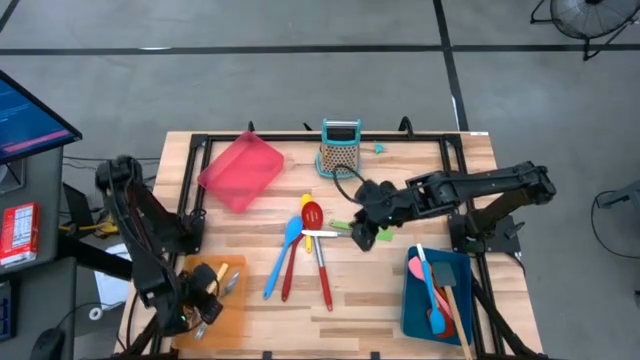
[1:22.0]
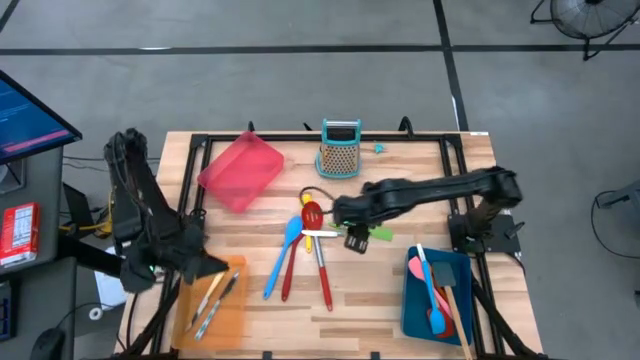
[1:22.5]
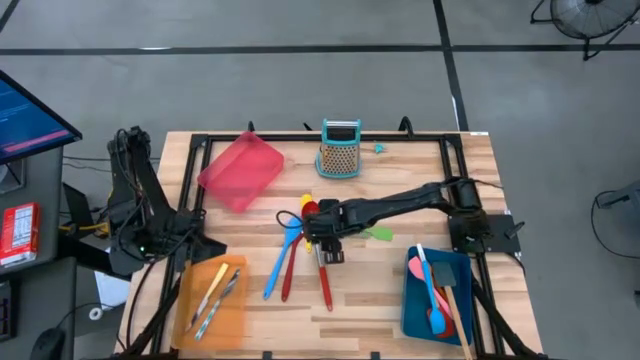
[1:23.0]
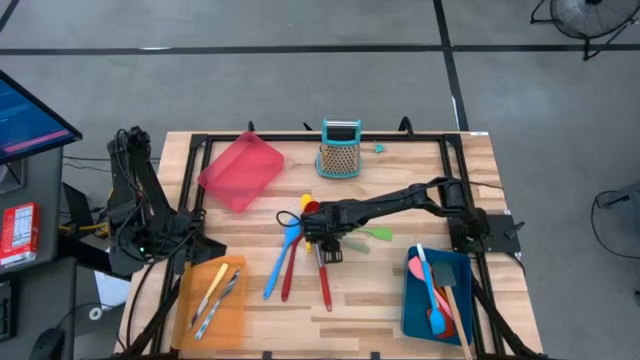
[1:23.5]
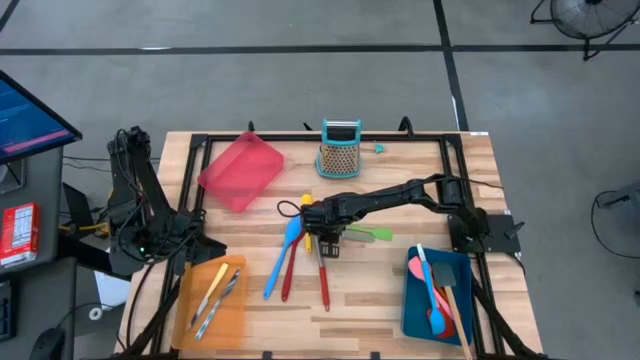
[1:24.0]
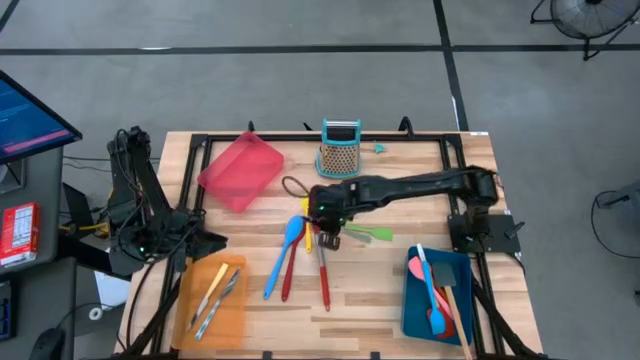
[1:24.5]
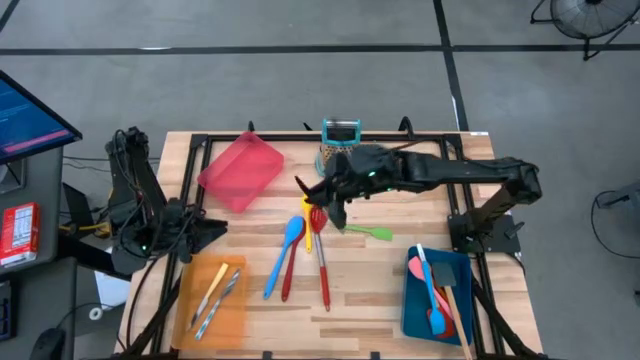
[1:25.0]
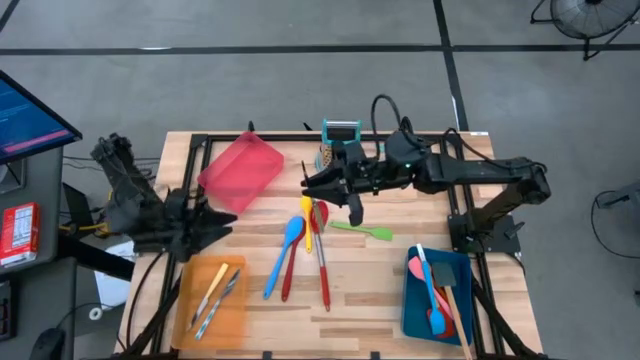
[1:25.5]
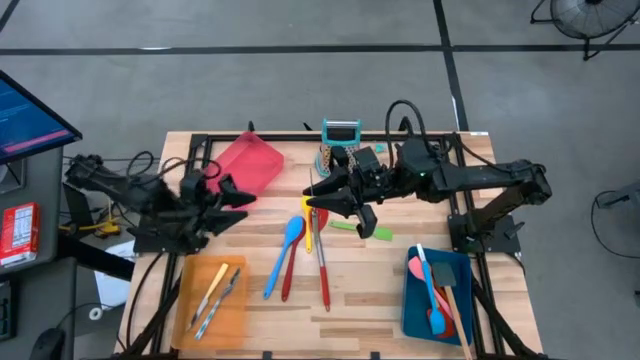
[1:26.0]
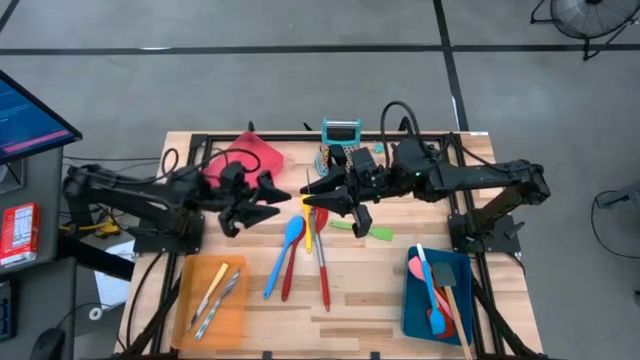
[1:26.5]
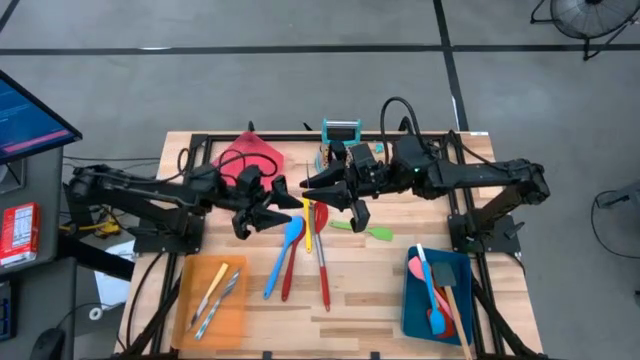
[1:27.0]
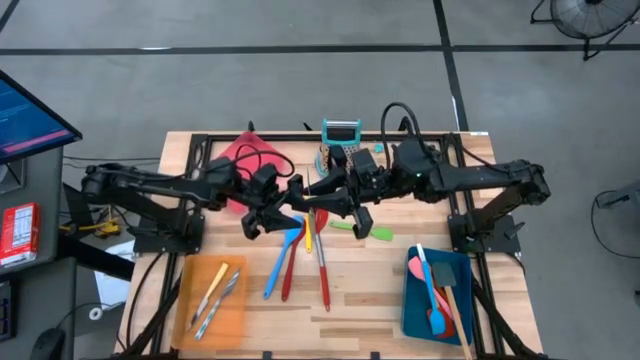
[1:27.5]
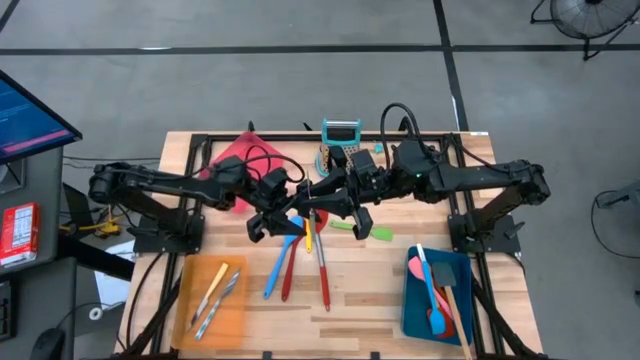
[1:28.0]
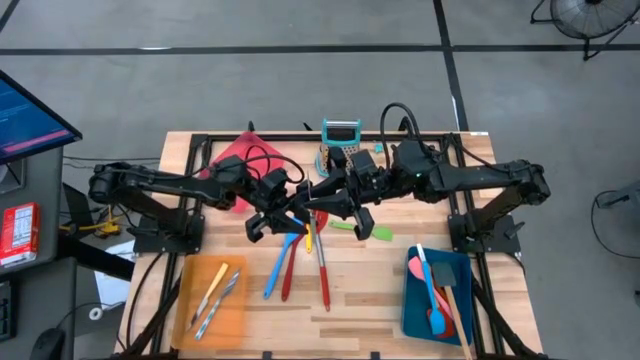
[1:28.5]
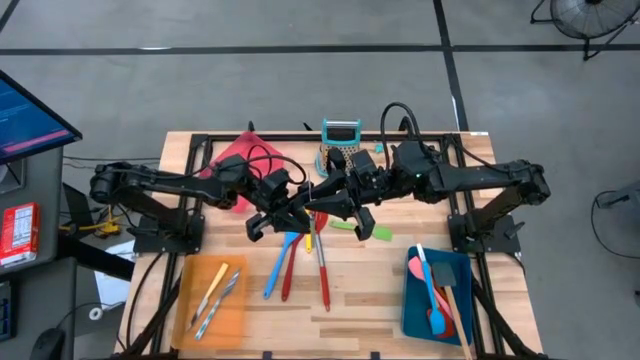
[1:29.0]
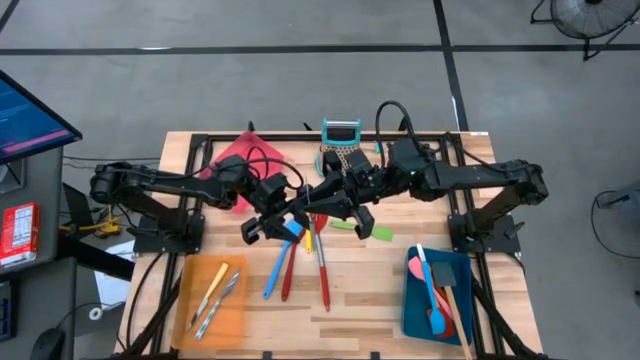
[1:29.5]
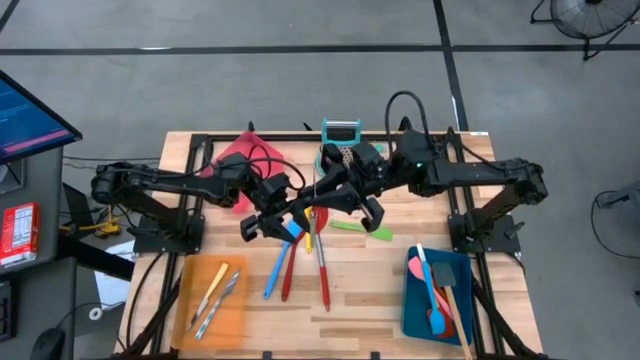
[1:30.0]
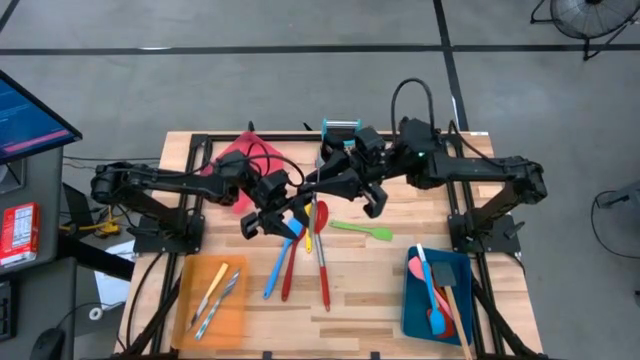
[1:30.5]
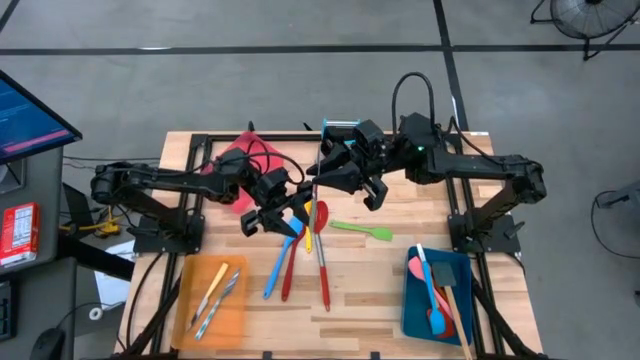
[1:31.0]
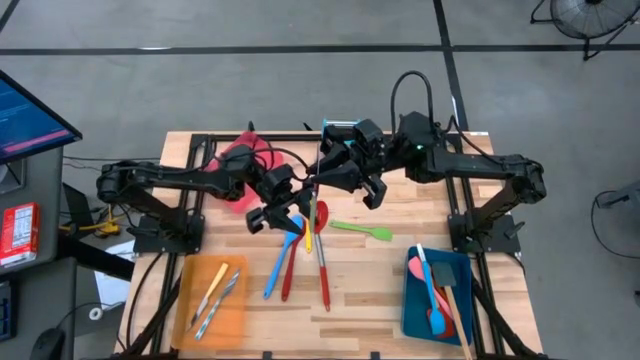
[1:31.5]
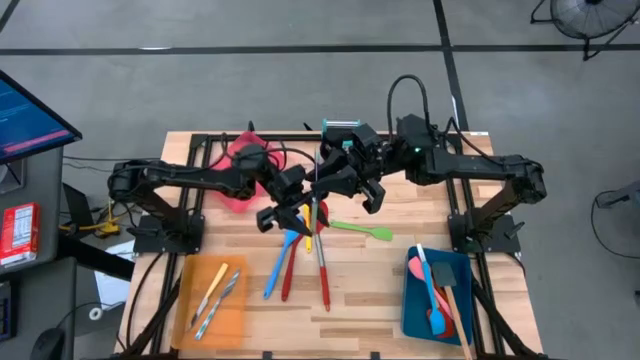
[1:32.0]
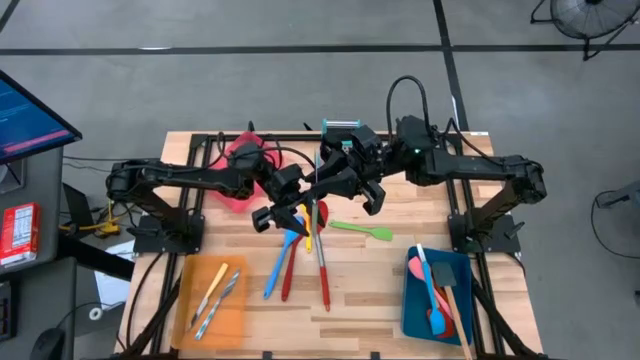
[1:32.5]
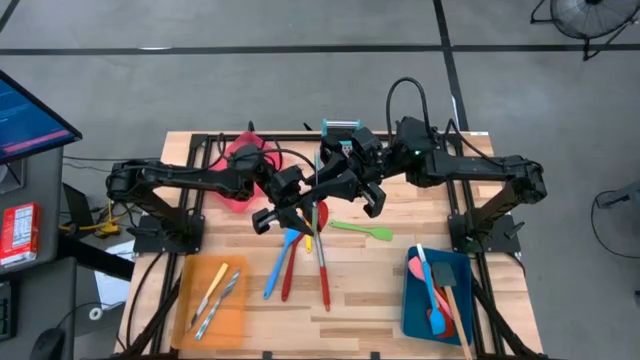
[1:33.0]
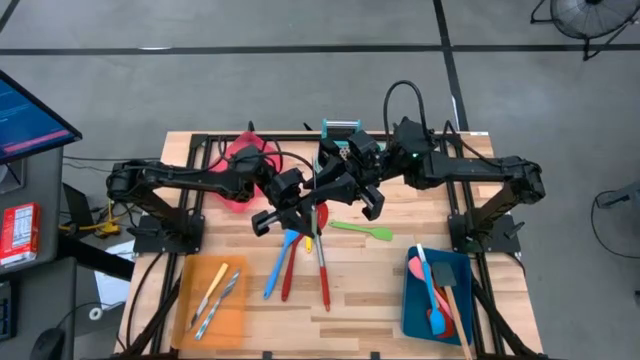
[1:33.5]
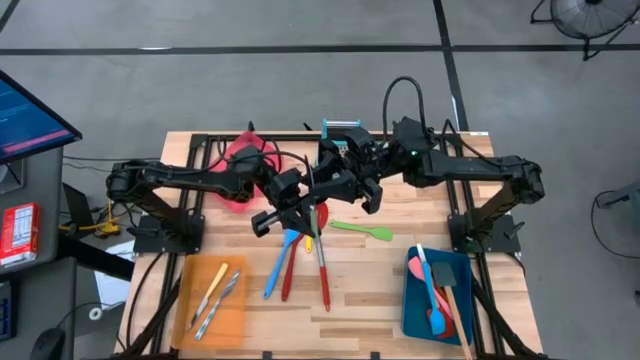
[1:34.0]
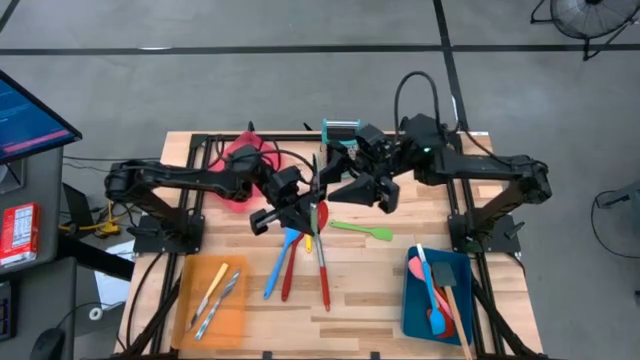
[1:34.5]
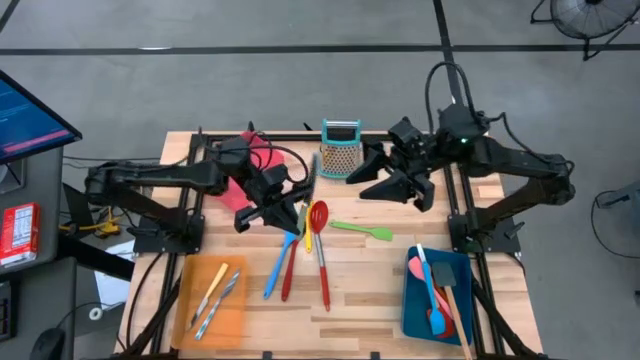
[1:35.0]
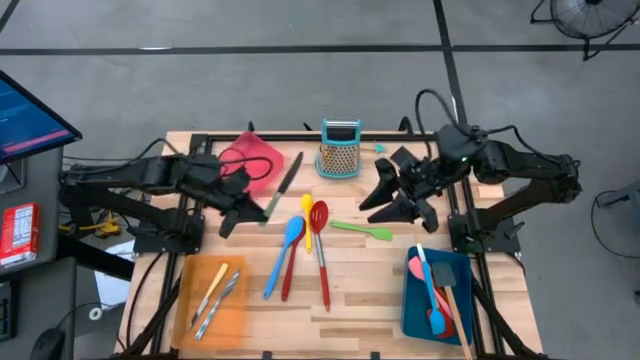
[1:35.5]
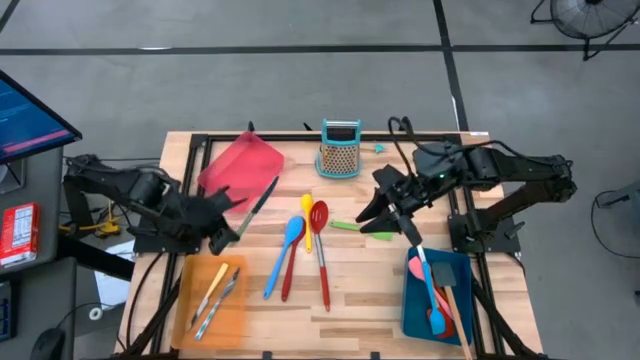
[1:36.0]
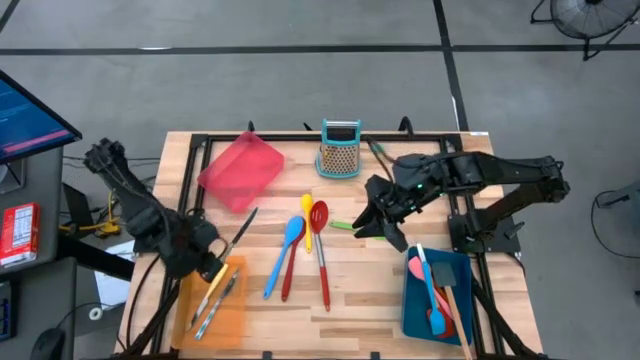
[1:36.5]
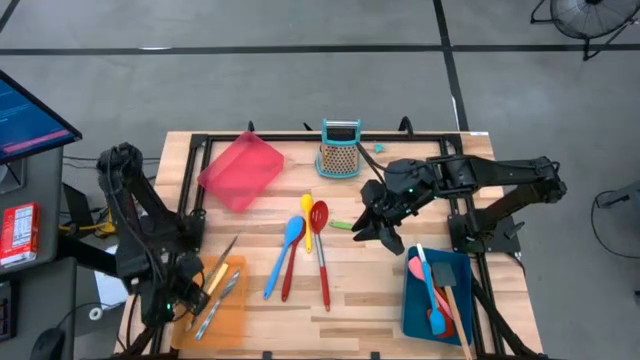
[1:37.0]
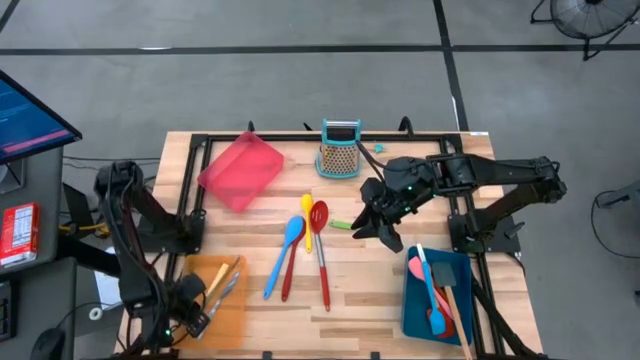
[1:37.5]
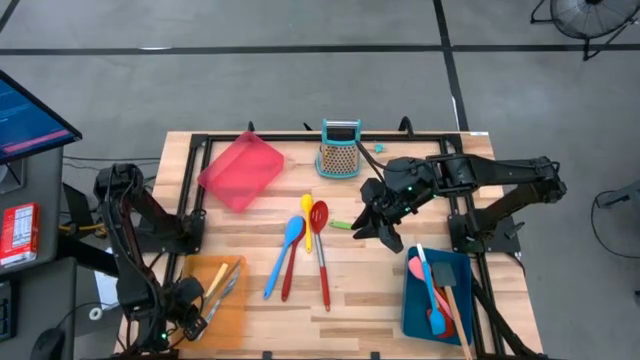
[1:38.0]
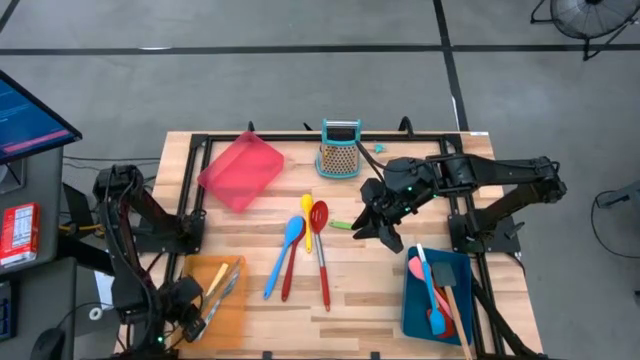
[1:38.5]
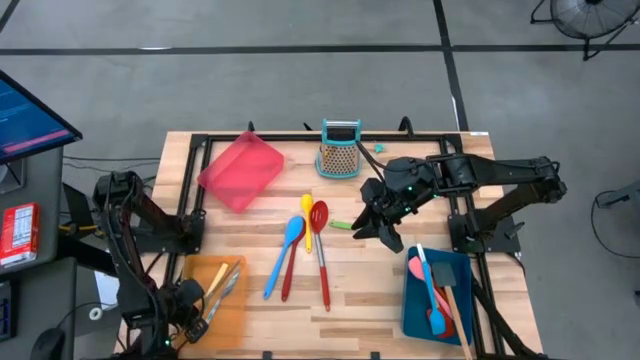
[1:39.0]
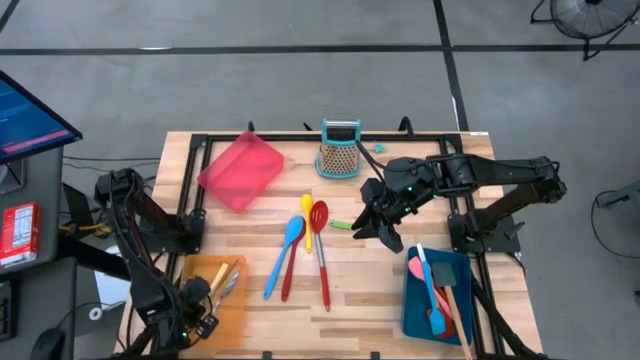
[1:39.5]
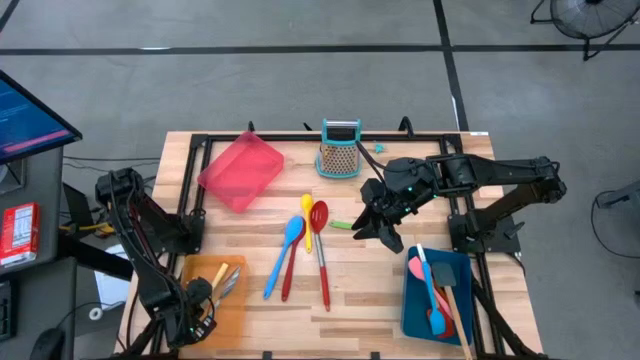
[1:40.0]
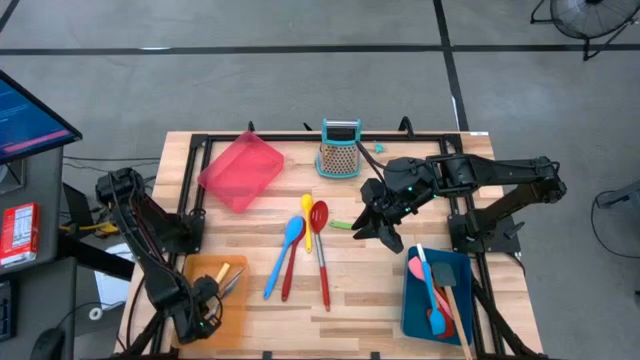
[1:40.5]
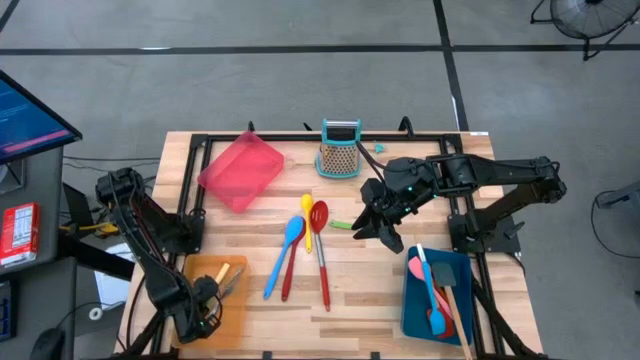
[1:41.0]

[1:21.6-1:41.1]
Task: Pick & Place Kitchen Items
Put the green table knife into the orange bin

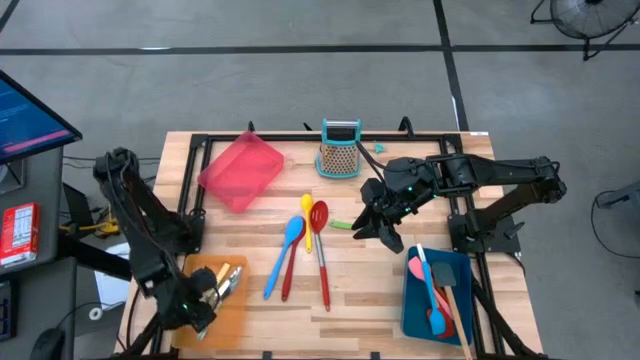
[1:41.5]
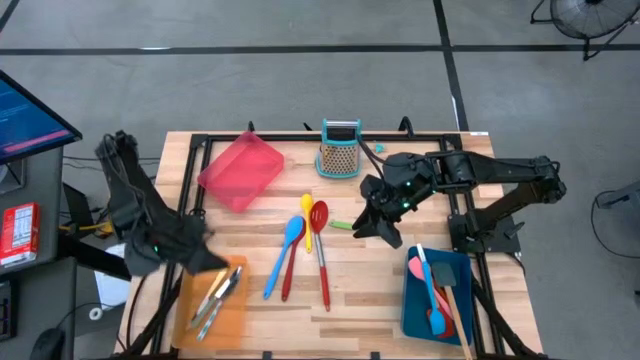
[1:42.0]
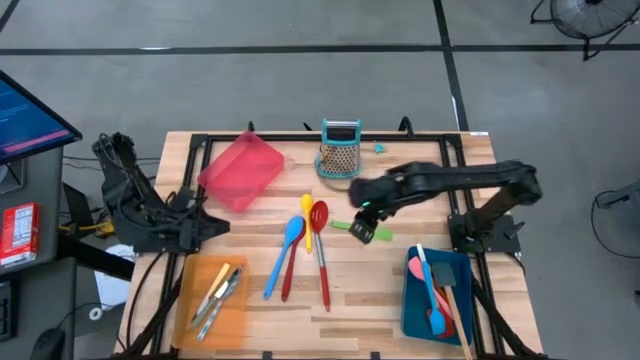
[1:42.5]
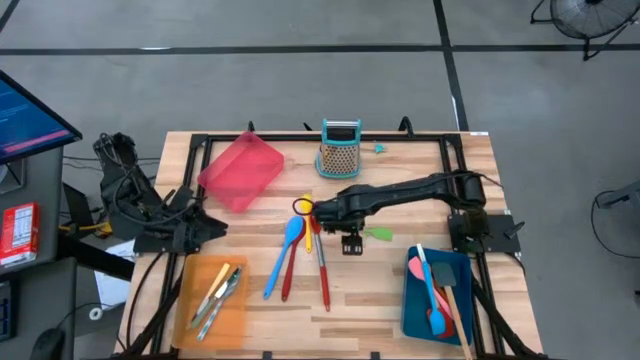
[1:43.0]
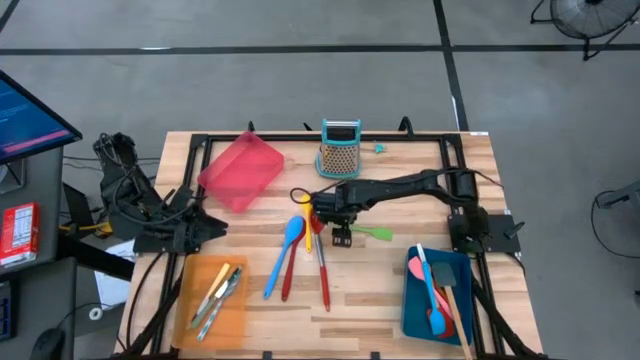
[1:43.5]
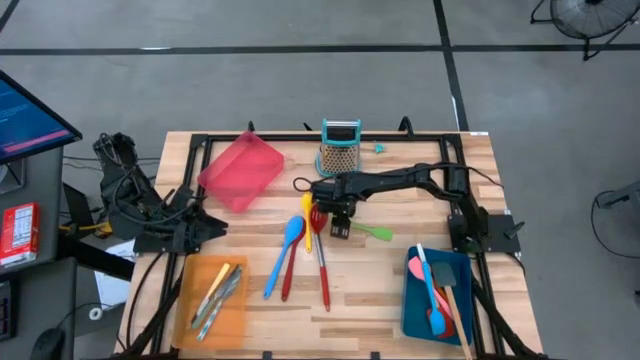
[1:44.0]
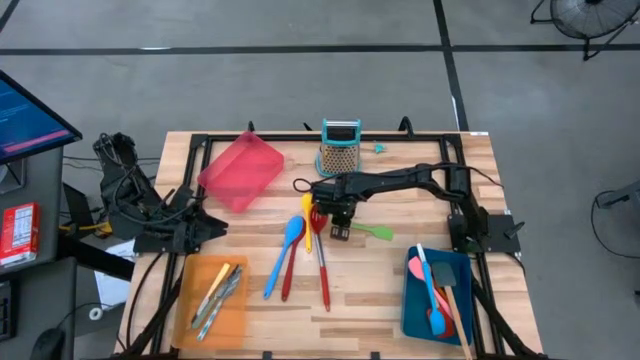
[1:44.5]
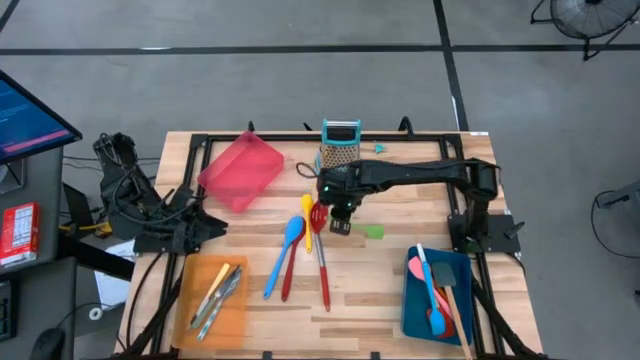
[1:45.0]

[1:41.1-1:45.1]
Put the green spatula into the blue bin
